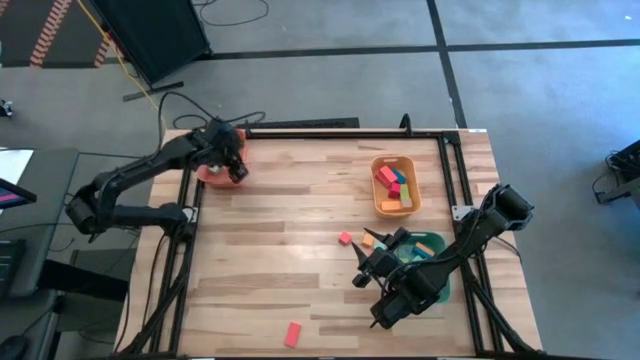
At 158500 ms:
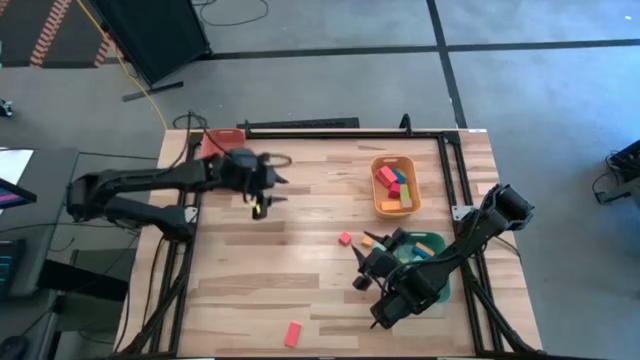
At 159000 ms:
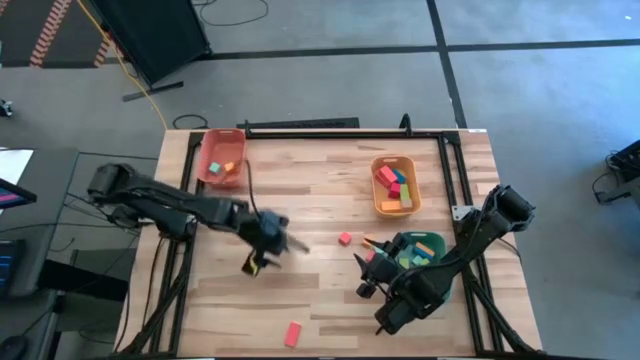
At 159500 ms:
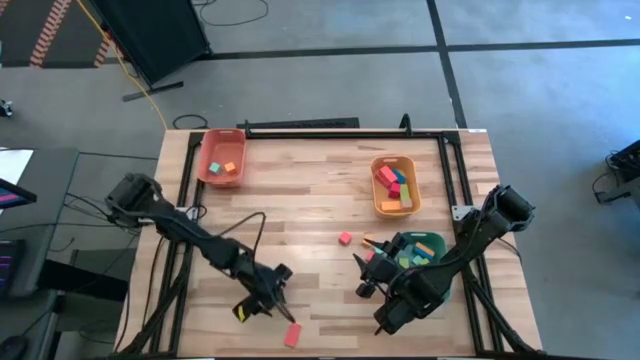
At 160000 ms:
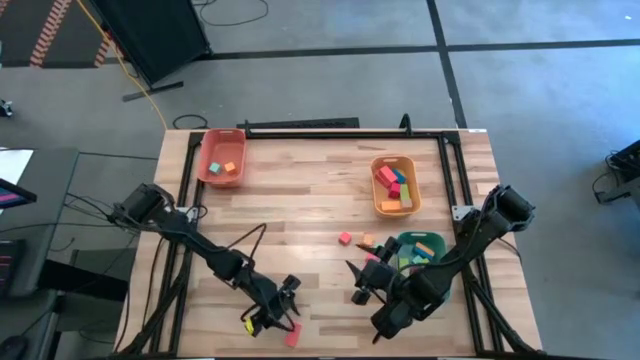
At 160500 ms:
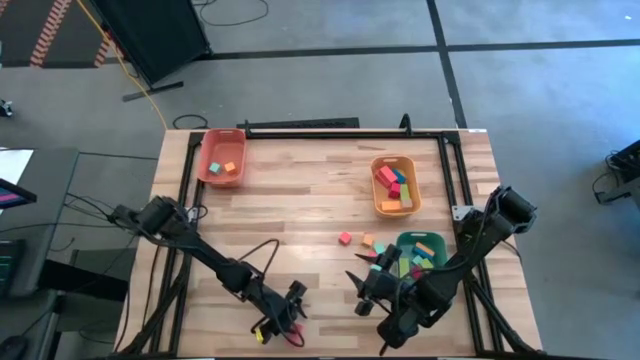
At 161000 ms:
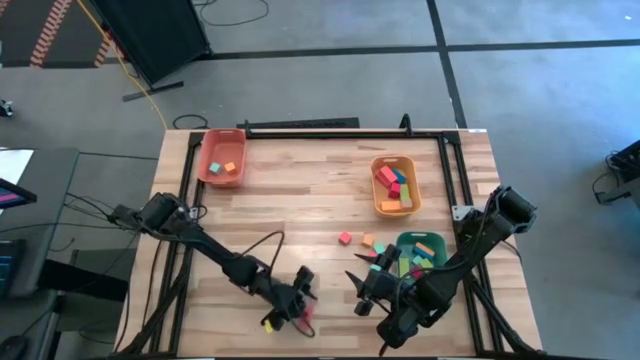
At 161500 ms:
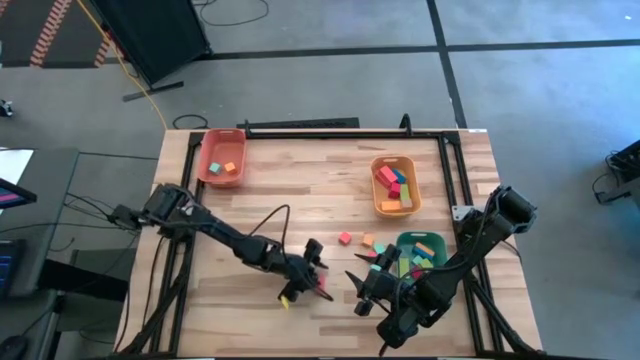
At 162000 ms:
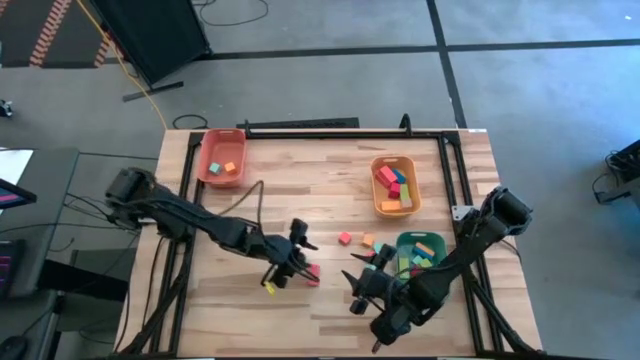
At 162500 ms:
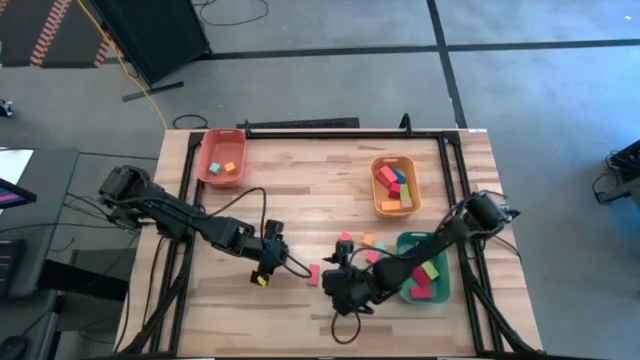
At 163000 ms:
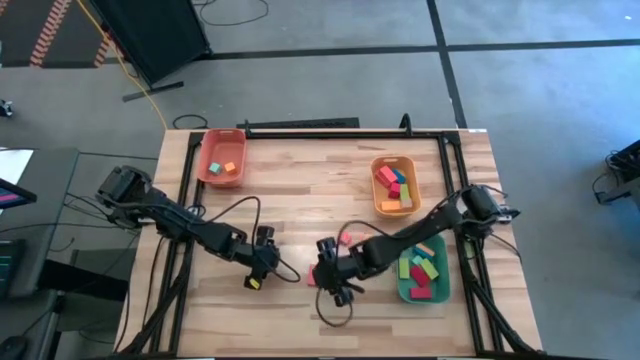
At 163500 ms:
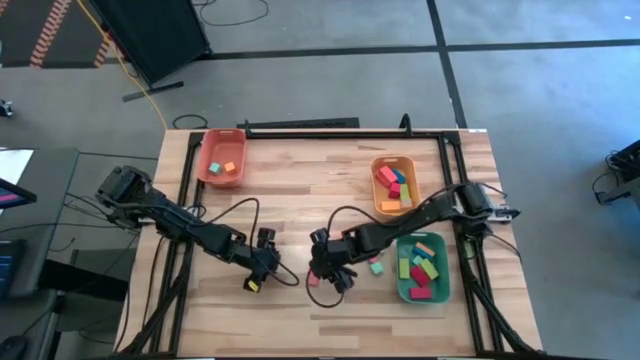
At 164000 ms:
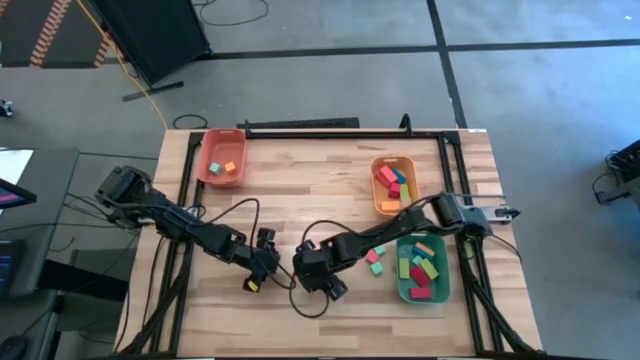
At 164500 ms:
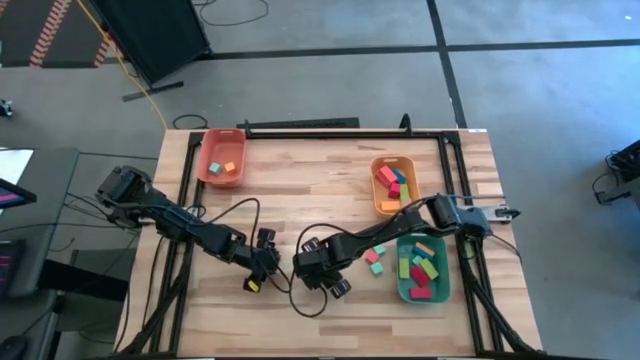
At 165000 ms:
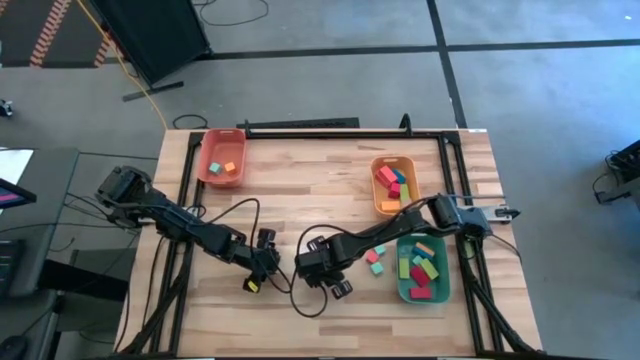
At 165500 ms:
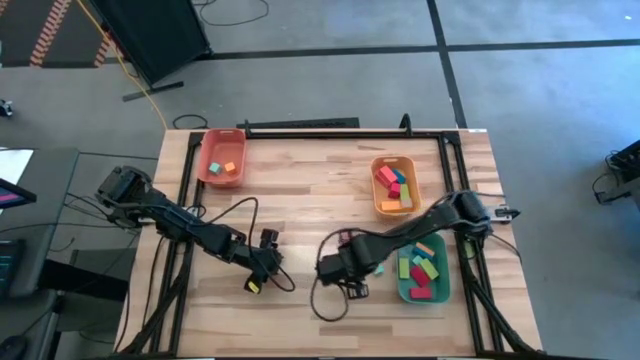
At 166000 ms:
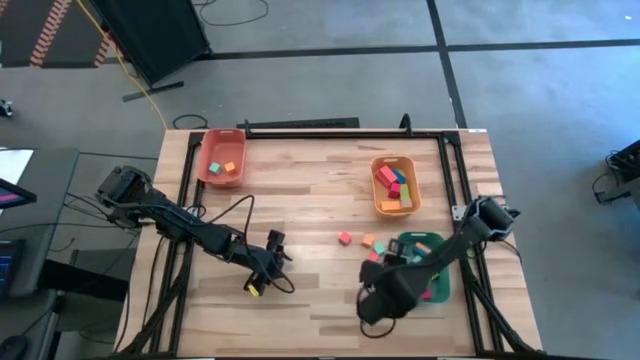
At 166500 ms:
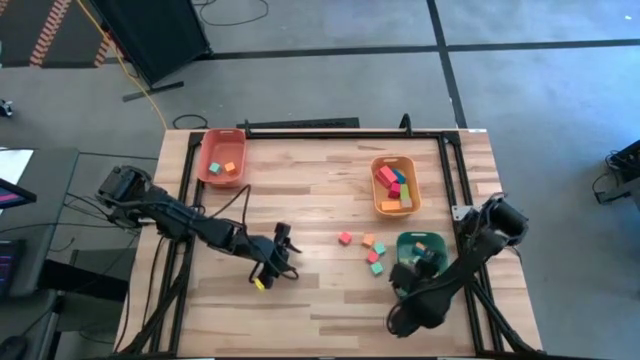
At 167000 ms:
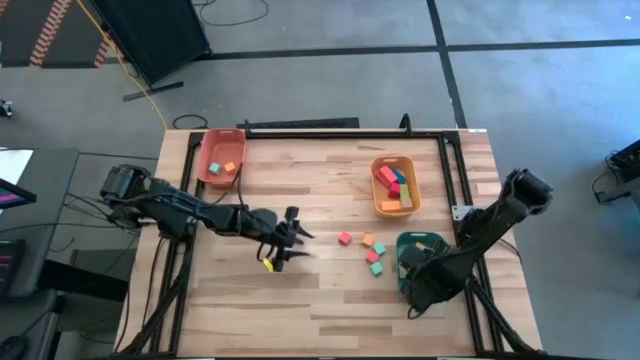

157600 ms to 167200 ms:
Task: Sort blocks by size
Put the small rectangular orange block into the green bin

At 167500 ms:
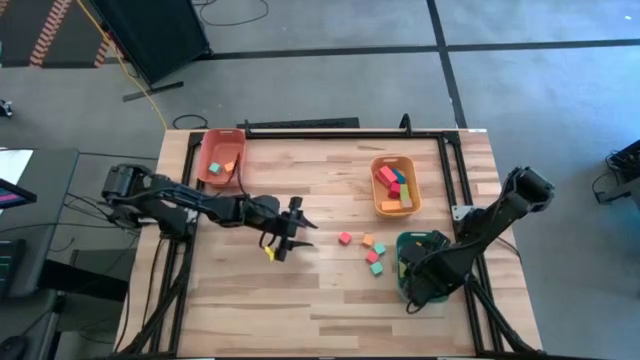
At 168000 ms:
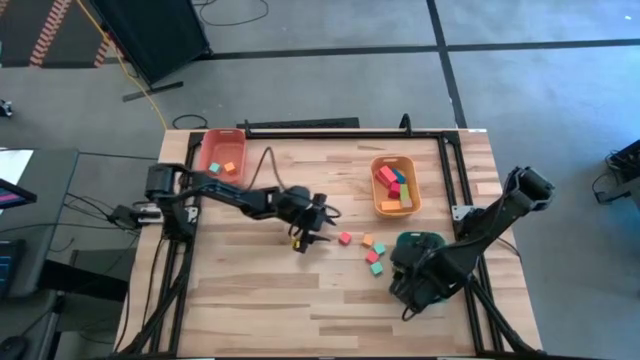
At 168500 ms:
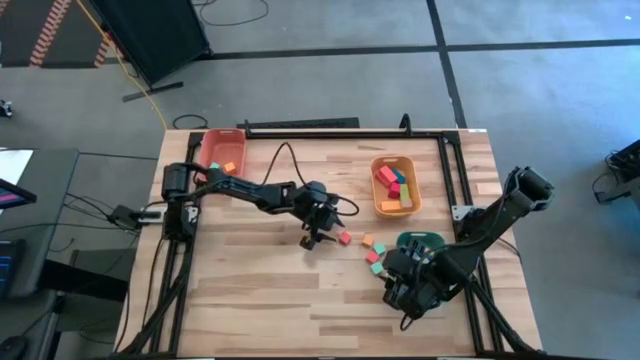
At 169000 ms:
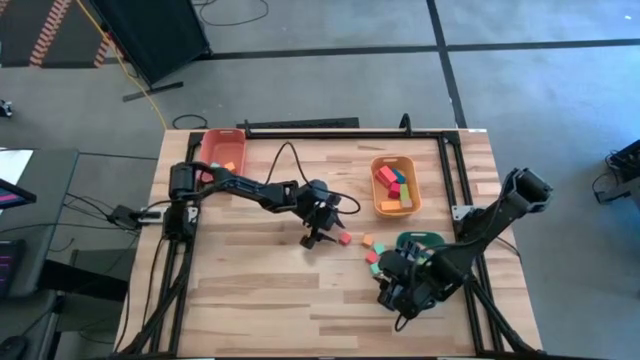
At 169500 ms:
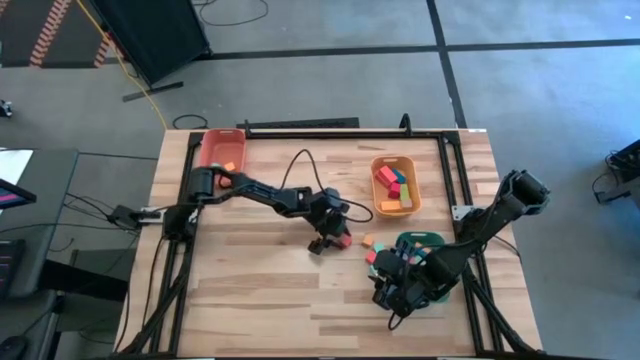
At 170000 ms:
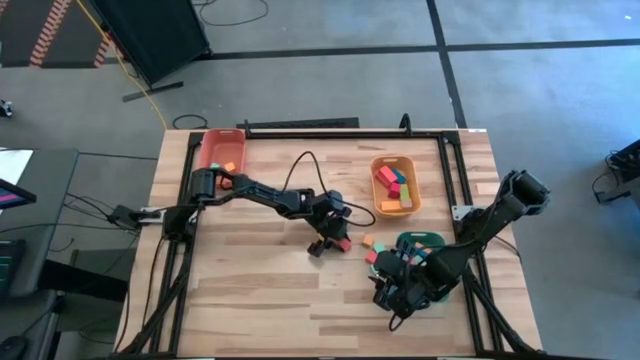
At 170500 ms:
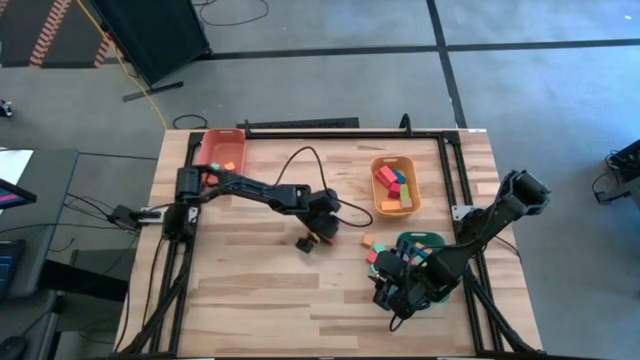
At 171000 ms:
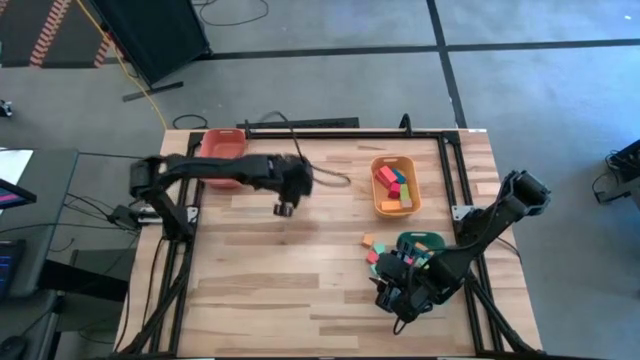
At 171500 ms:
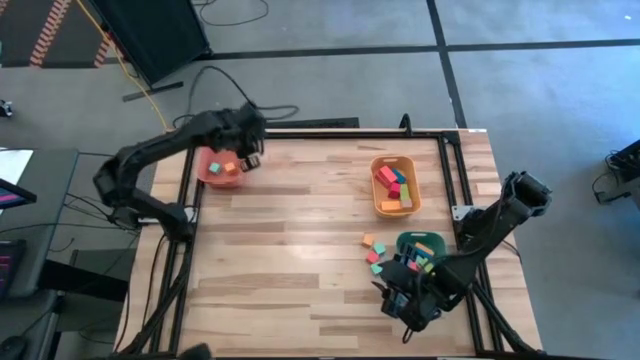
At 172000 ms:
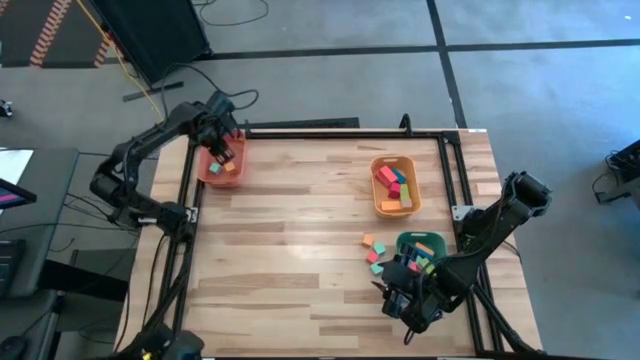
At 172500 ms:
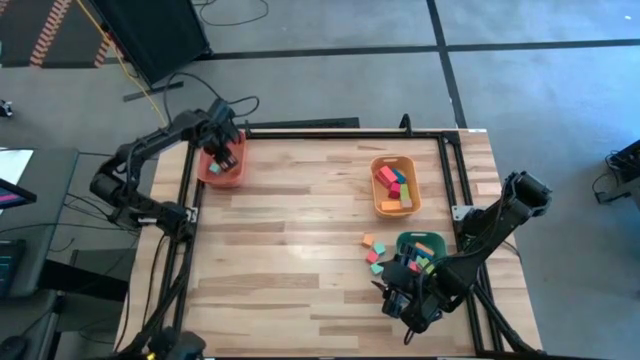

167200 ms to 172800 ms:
Put the top square orange block into the orange bin

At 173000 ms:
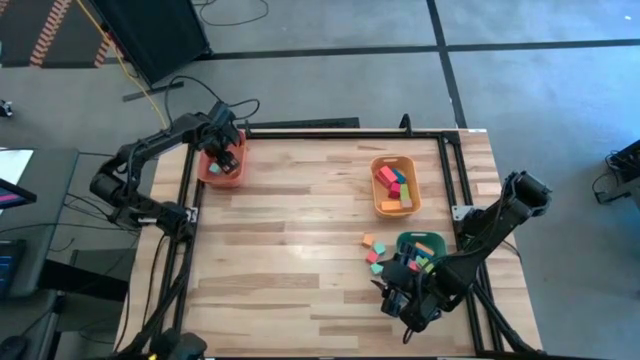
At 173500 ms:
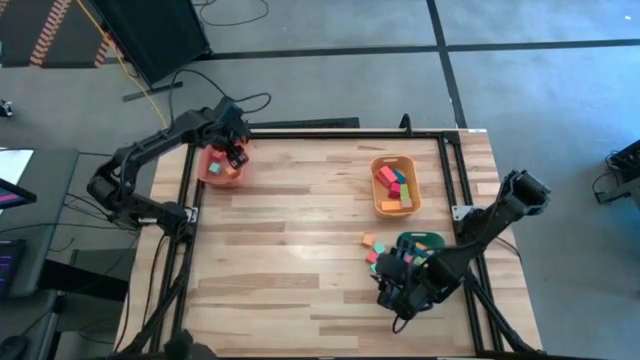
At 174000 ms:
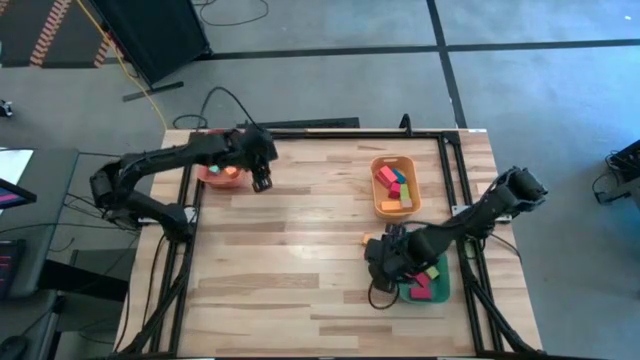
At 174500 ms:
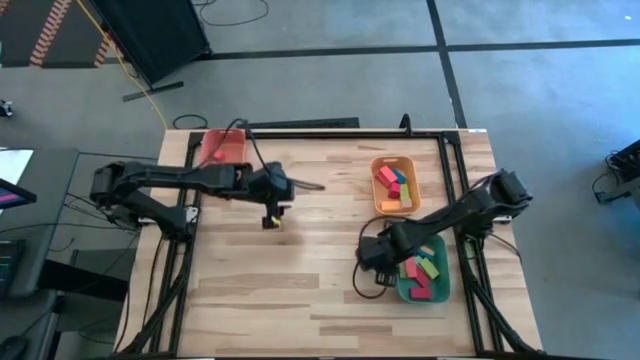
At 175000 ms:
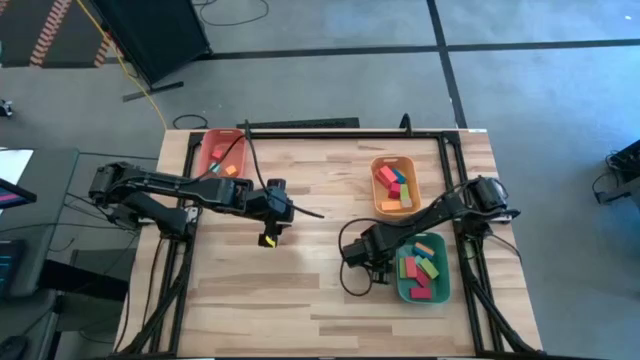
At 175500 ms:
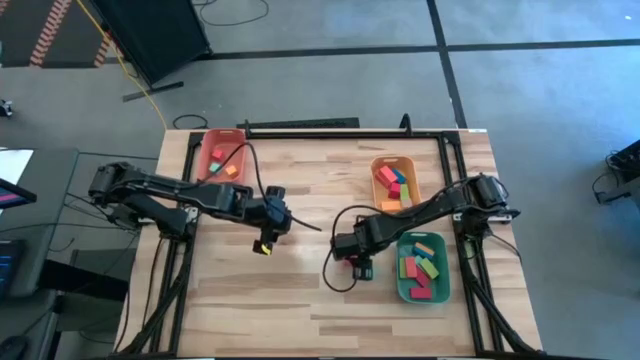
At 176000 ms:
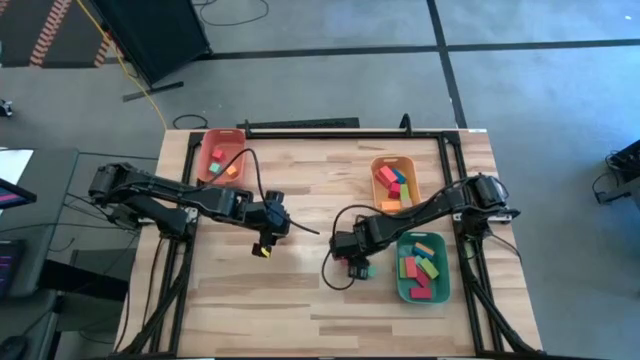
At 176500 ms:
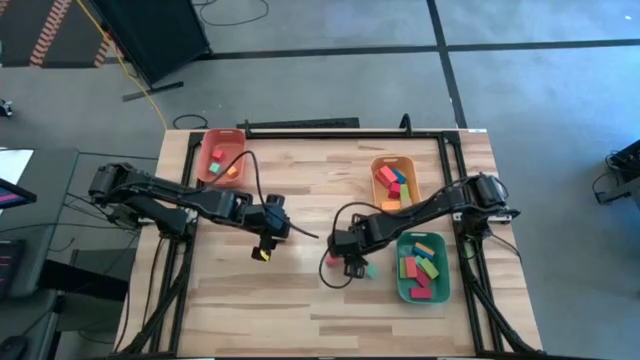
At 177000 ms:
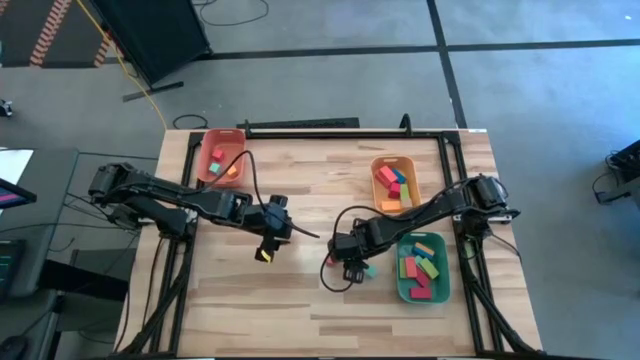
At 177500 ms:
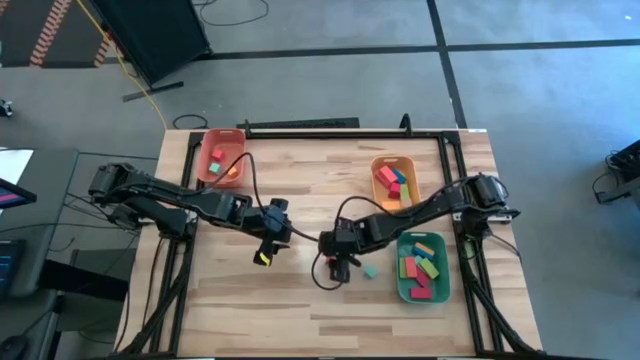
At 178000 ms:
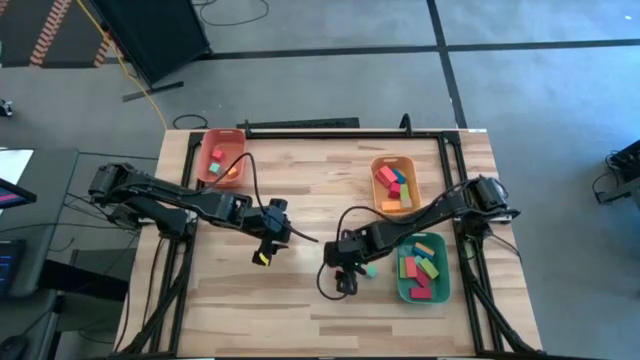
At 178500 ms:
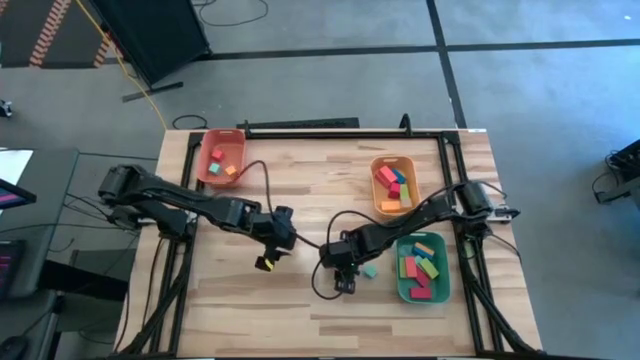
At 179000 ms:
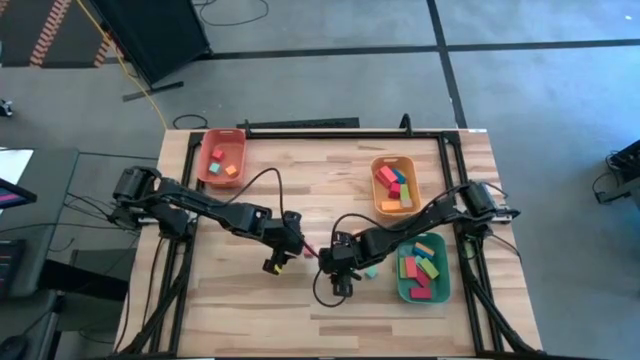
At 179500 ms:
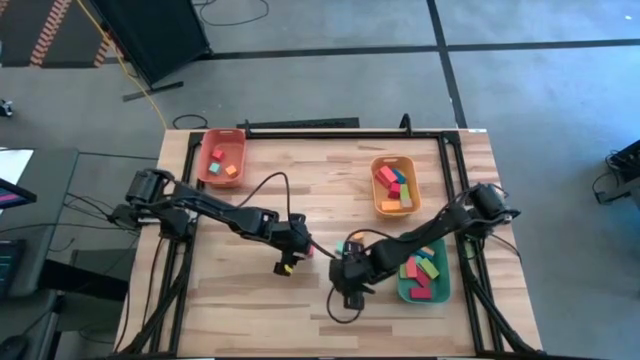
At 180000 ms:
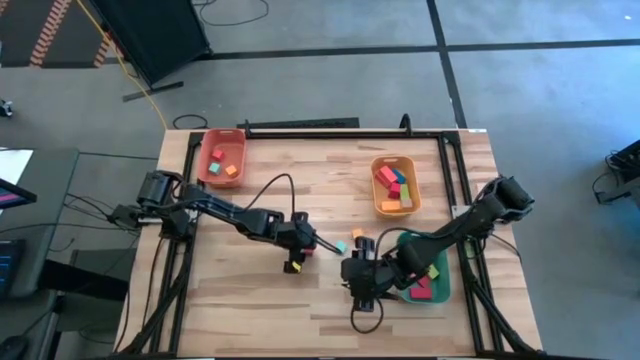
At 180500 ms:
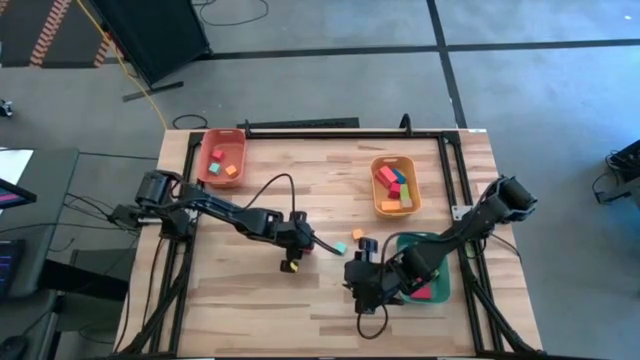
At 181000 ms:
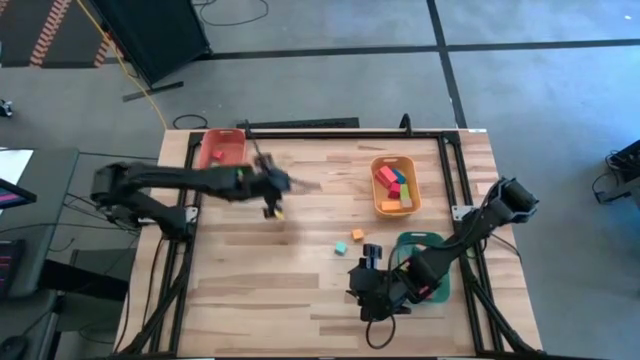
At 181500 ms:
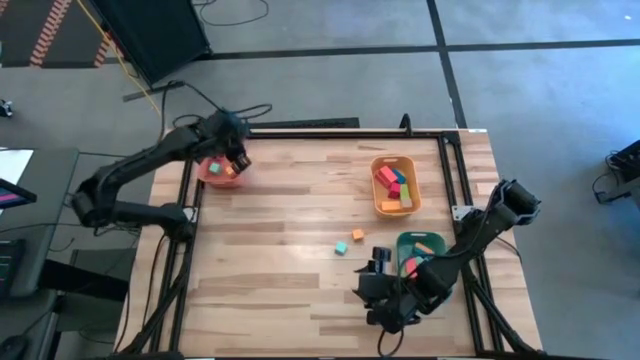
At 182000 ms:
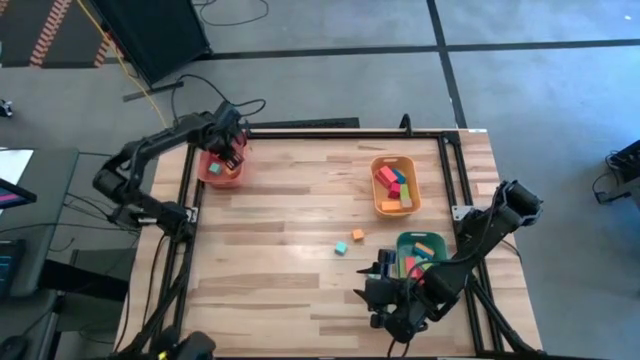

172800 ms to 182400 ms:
Put the square orange block into the orange bin
